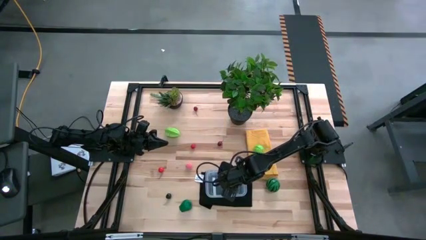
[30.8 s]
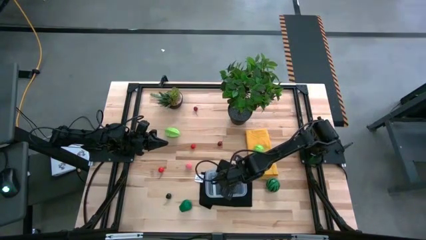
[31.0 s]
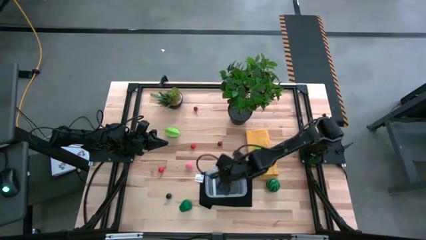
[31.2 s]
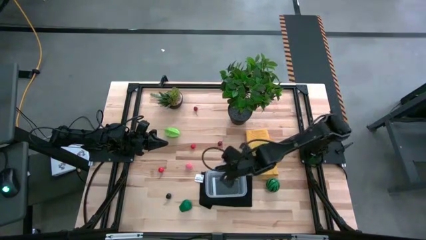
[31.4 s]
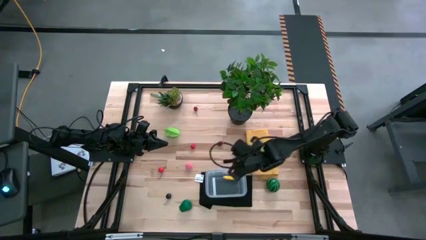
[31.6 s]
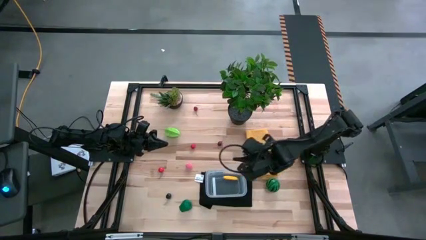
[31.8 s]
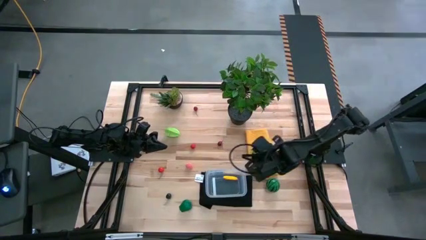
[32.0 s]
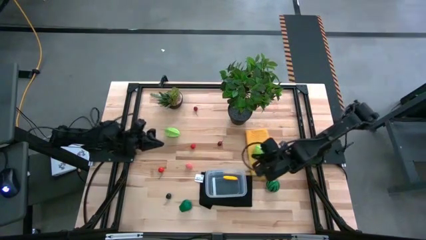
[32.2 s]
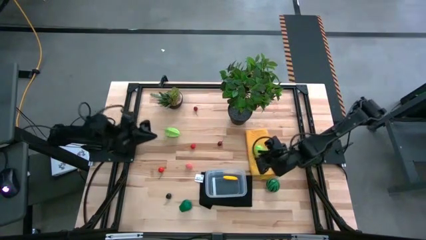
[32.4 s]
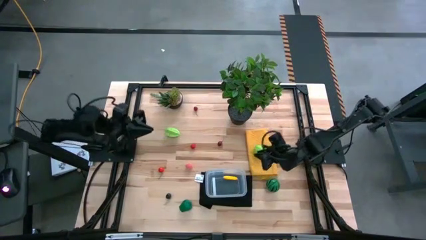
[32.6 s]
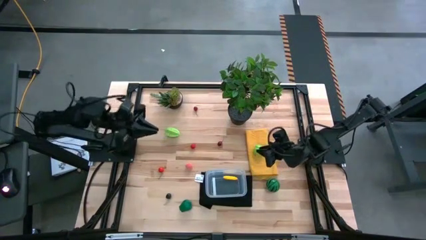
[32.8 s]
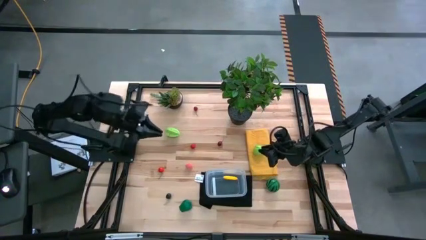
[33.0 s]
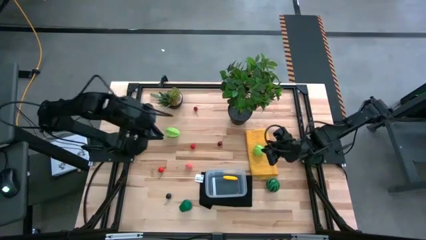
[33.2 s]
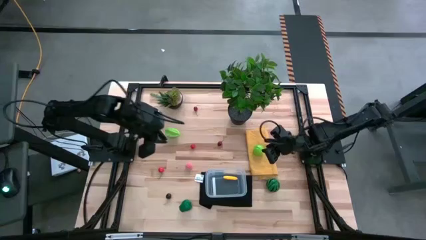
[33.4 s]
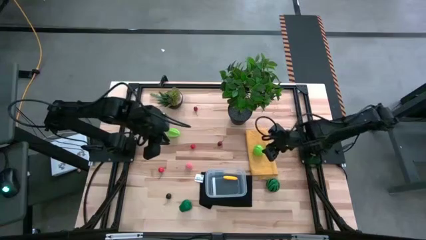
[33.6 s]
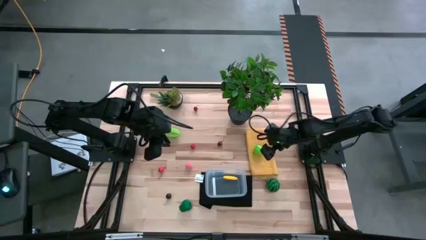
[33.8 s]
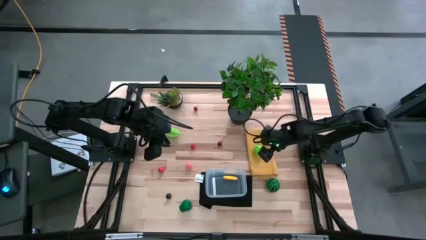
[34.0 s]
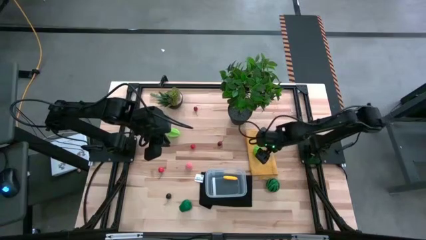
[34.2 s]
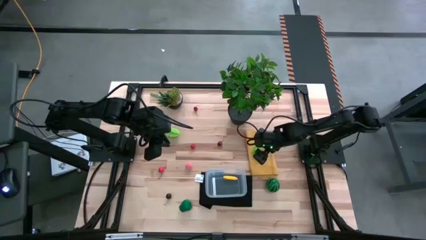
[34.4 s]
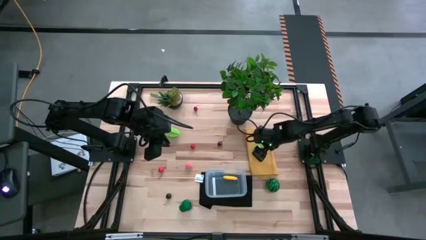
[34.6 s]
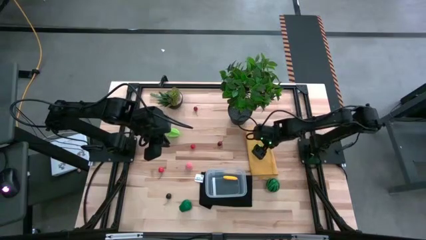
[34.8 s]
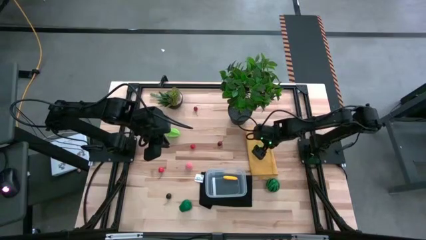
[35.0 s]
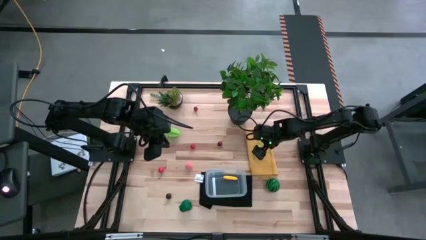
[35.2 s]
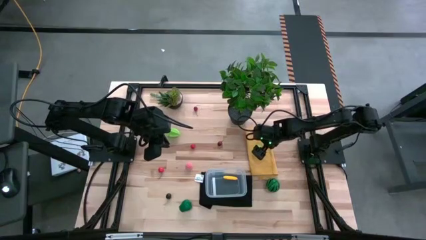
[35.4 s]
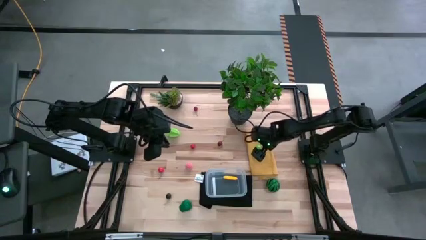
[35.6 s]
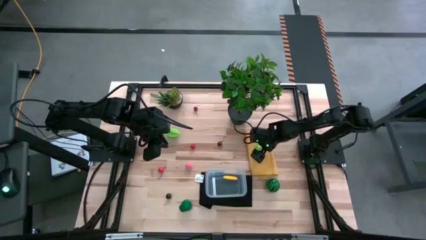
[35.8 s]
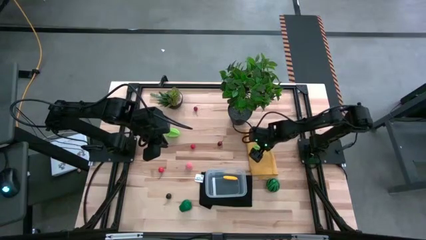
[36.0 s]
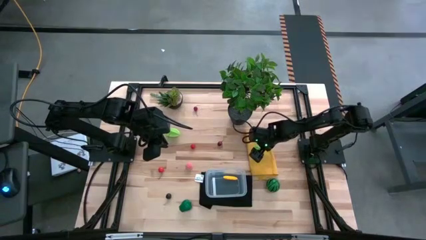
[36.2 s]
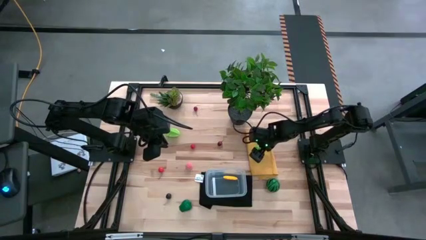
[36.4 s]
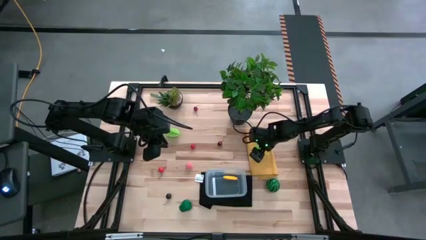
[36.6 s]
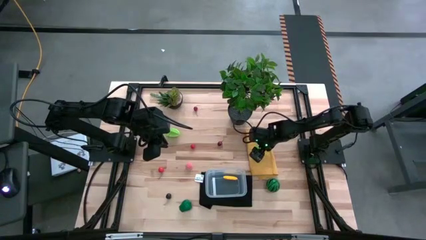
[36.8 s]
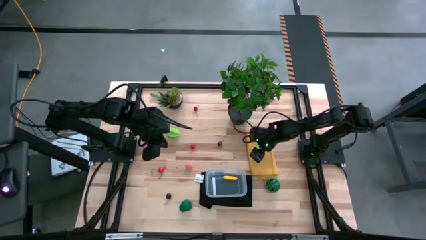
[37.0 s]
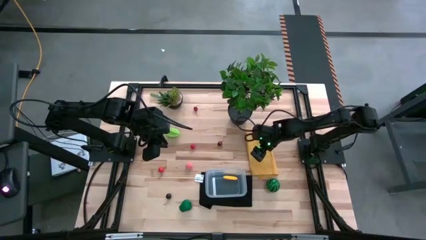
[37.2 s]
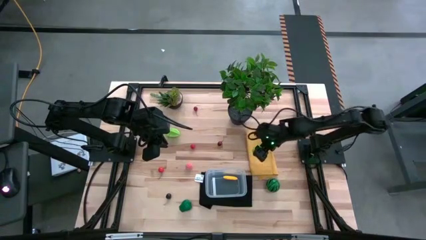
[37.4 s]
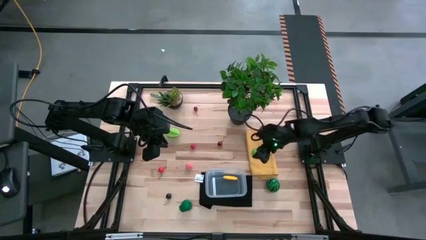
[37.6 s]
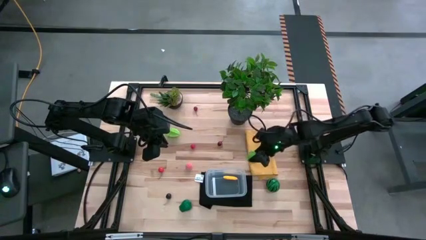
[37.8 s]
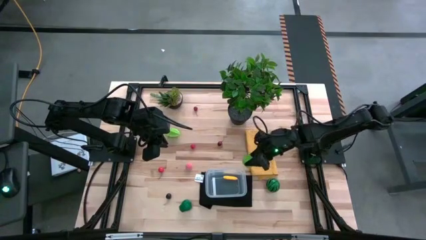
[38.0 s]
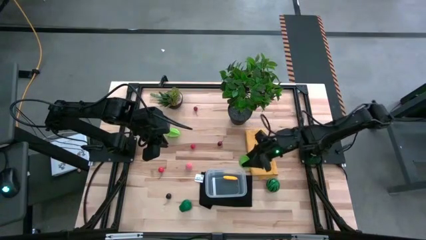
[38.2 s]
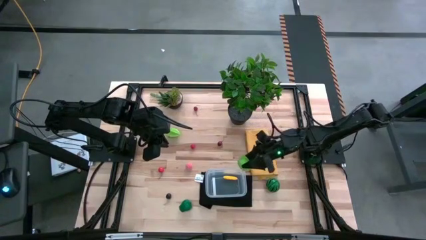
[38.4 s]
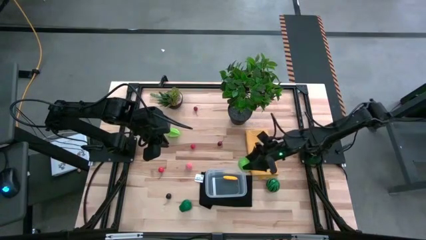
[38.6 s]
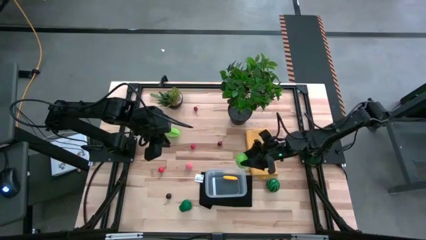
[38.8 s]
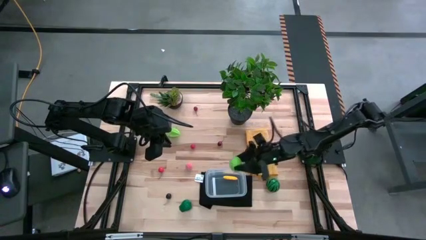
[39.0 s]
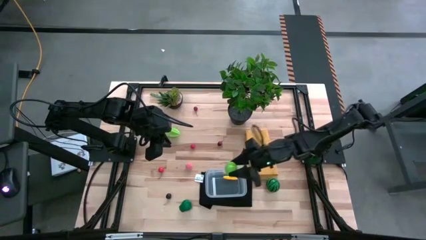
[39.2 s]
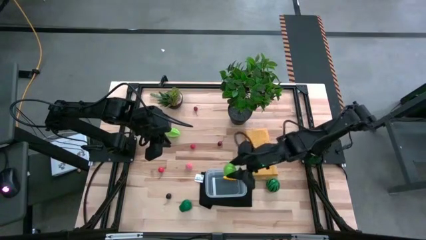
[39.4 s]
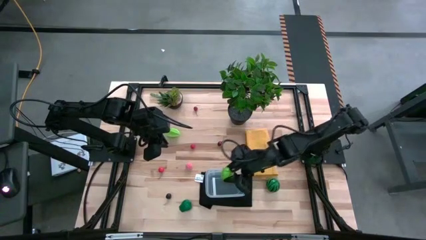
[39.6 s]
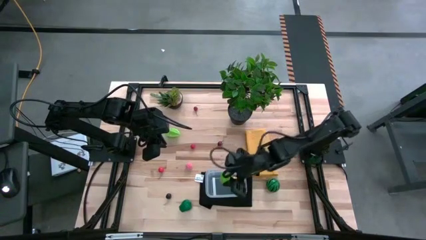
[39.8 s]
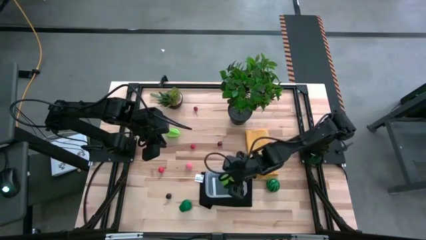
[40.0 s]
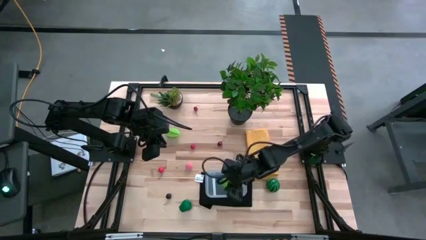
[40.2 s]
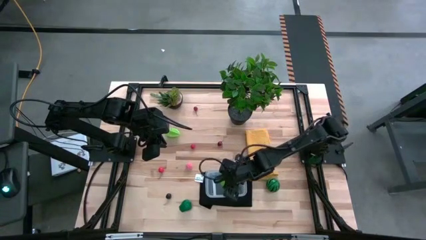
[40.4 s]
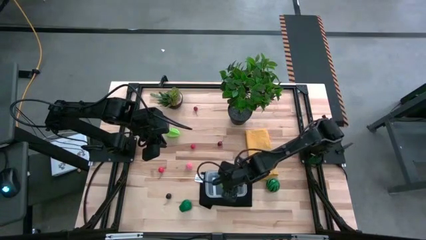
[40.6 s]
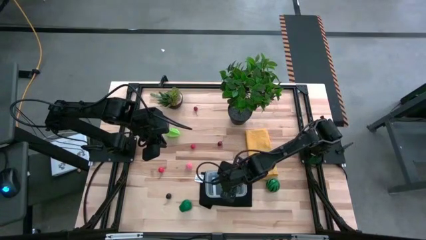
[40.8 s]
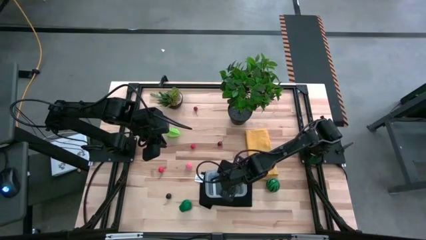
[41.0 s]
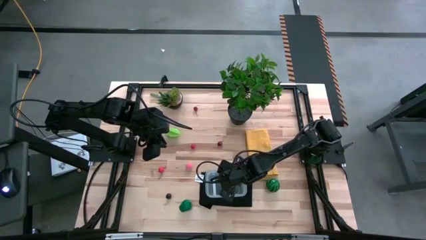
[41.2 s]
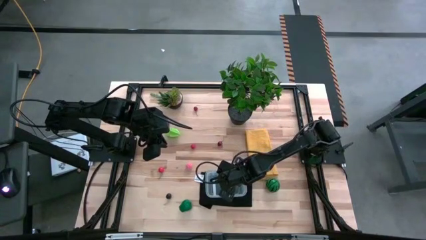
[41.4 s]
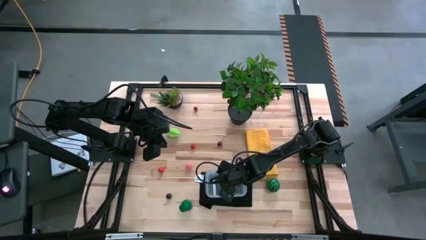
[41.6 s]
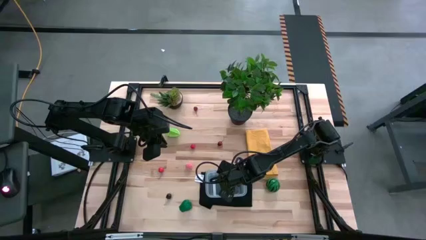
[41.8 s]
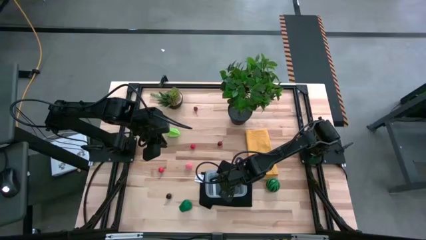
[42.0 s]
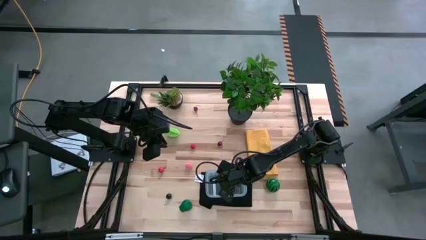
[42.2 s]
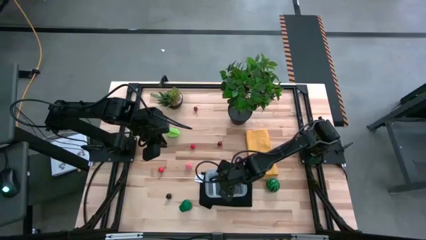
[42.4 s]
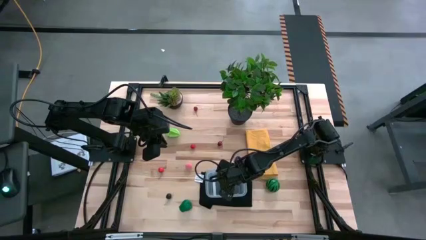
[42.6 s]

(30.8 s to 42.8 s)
Task: Pick and placing Produce into tupperware
Put the cabbage into the transparent bin
